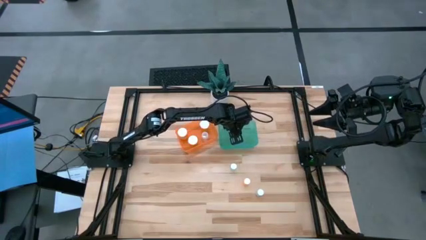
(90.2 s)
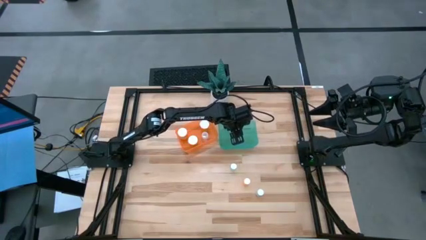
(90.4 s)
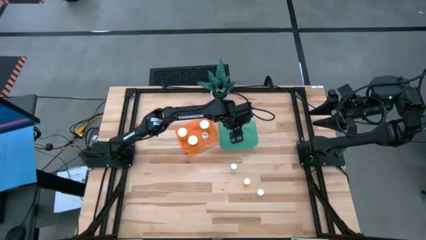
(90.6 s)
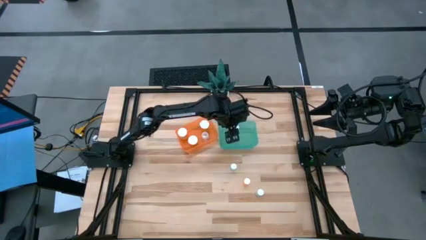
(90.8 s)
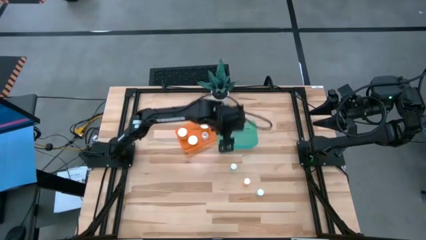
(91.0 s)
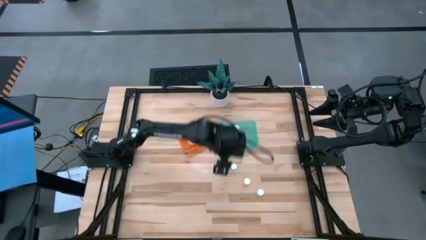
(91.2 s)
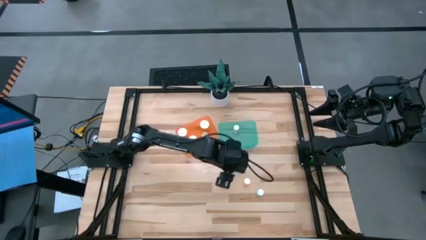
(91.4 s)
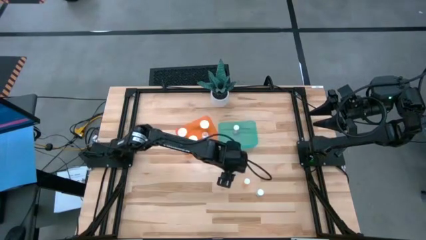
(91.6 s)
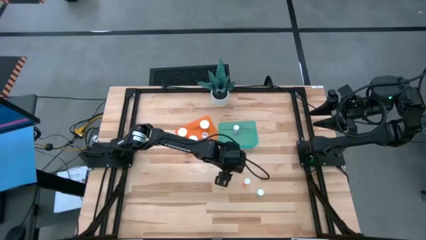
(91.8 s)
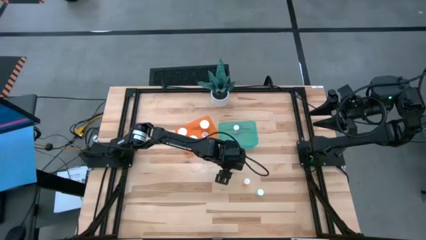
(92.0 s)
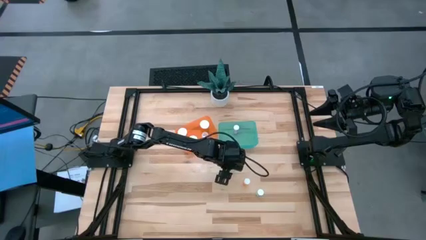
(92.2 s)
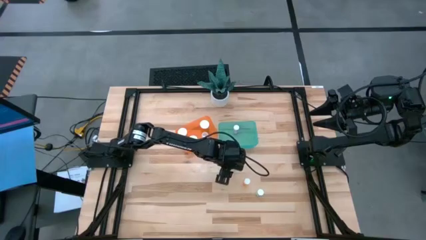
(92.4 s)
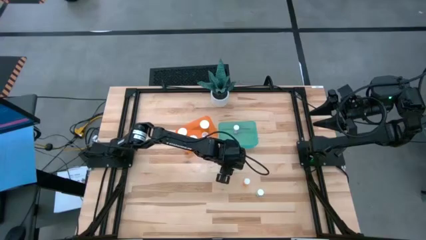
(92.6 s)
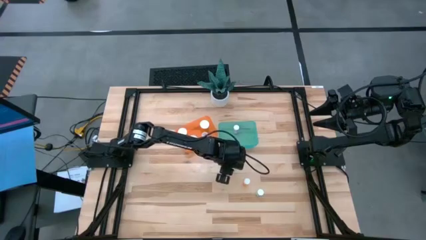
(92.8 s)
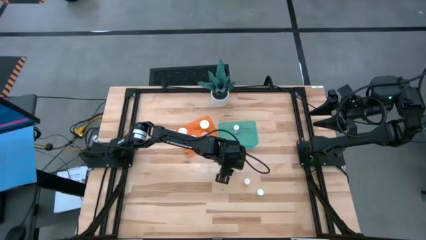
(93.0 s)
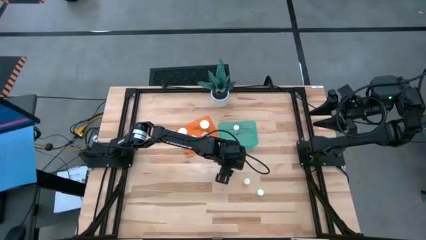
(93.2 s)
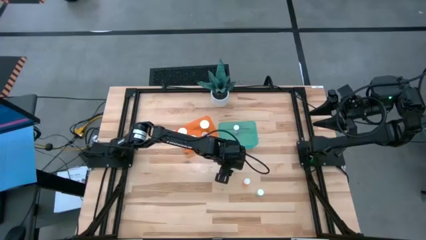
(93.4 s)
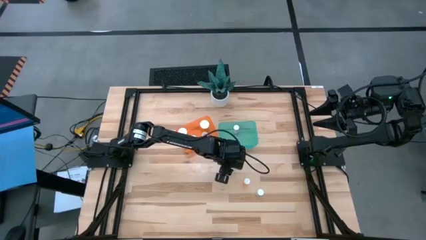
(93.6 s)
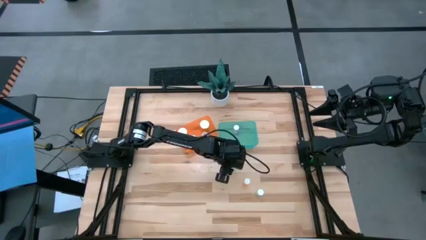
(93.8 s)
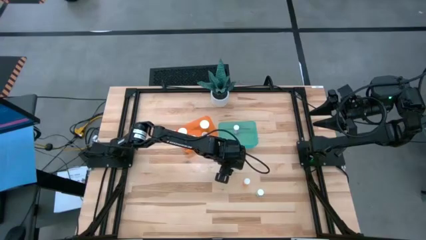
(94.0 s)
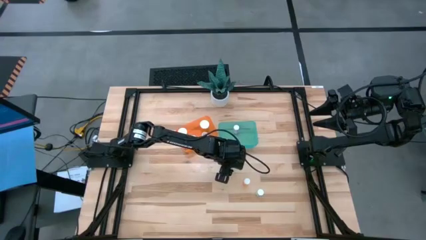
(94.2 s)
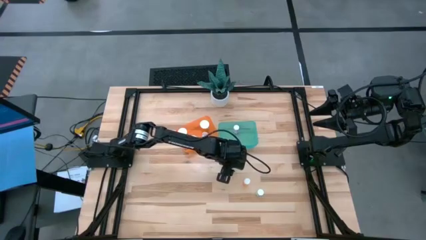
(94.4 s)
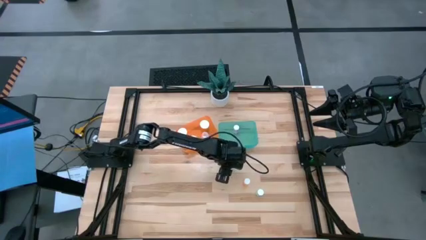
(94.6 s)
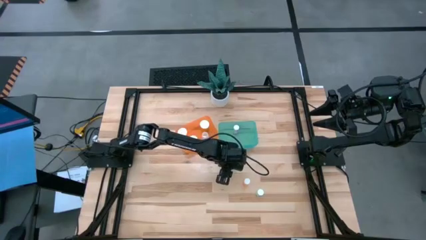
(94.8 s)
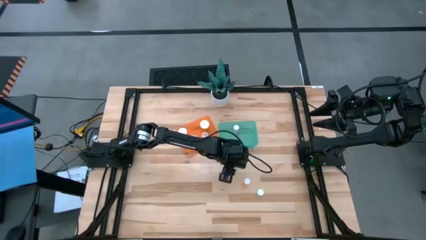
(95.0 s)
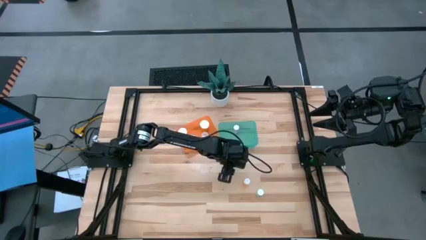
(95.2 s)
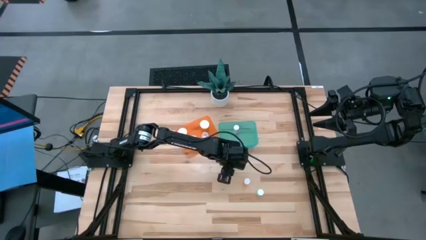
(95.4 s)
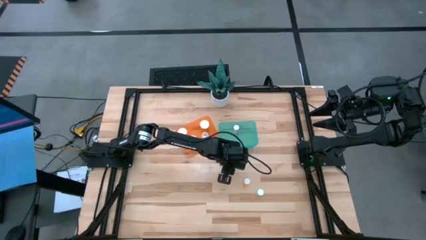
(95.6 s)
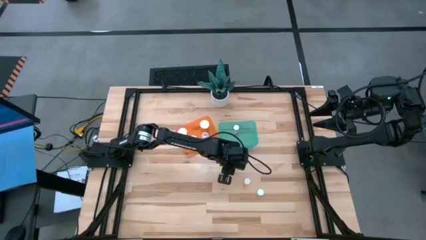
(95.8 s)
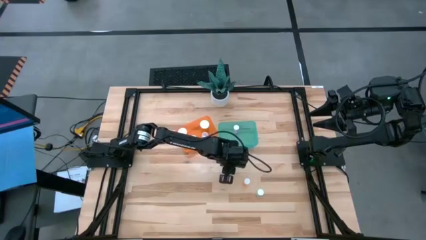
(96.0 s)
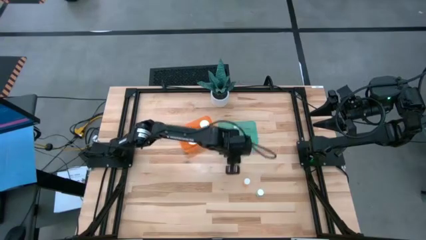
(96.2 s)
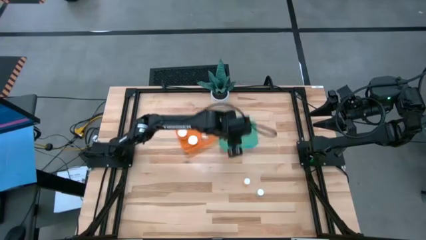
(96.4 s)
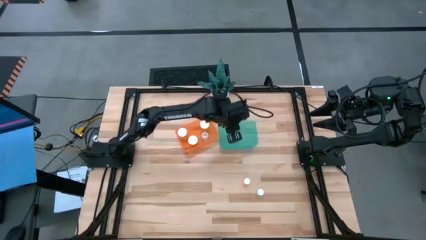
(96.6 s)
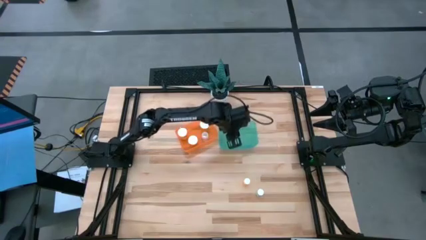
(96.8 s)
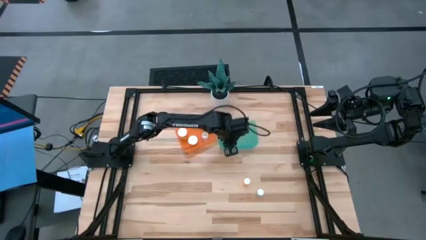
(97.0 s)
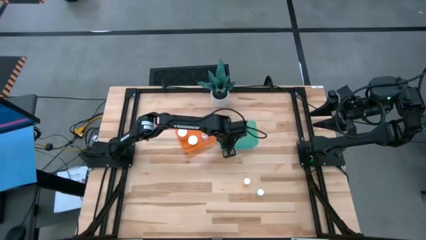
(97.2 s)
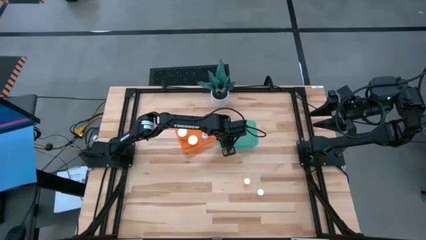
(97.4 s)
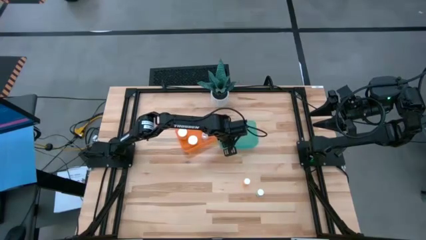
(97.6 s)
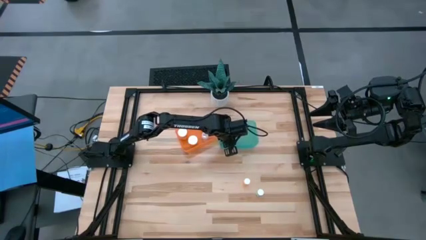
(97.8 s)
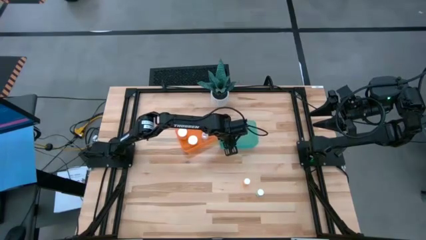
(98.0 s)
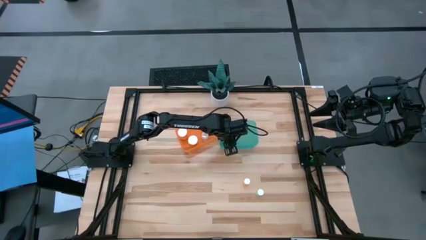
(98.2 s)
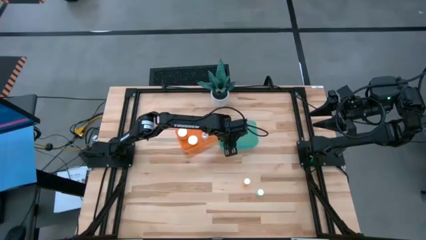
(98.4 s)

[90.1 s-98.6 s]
Task: Pick and place medicine bottles into bin by pill shape (circle, oval)
Put the left blue tablet bottle into the blue bin

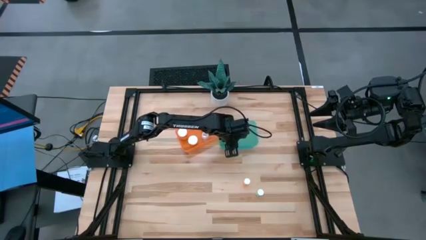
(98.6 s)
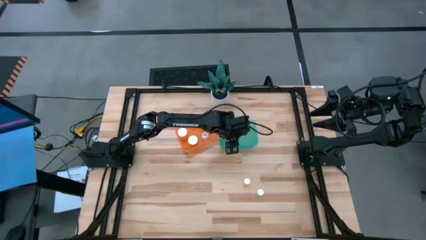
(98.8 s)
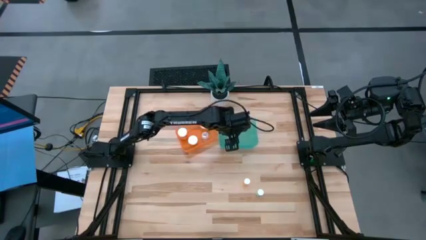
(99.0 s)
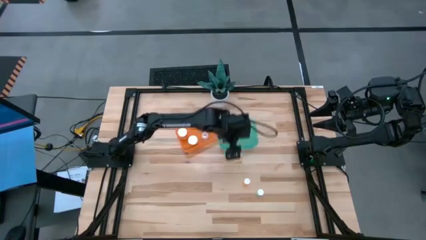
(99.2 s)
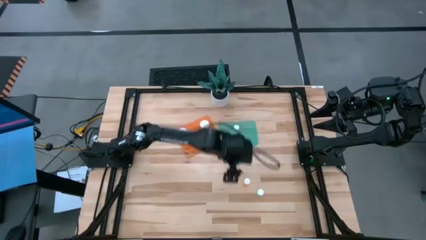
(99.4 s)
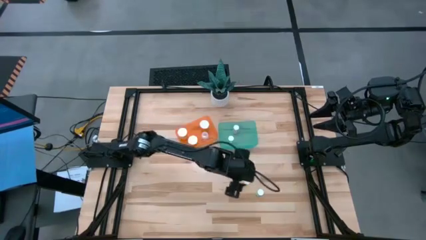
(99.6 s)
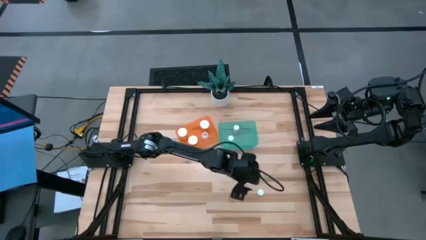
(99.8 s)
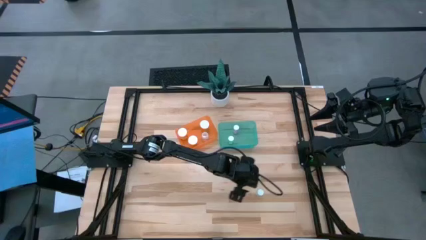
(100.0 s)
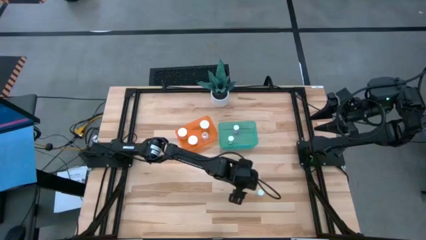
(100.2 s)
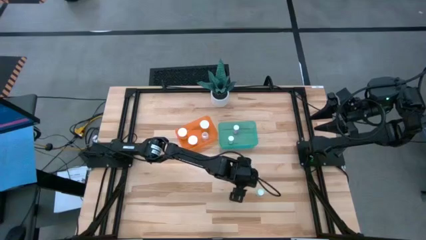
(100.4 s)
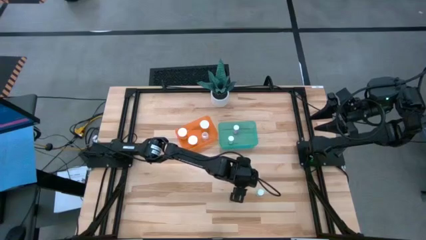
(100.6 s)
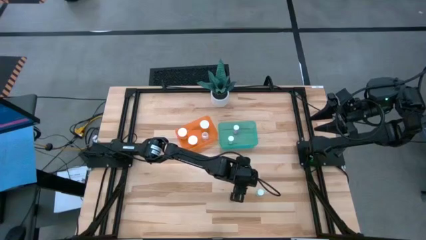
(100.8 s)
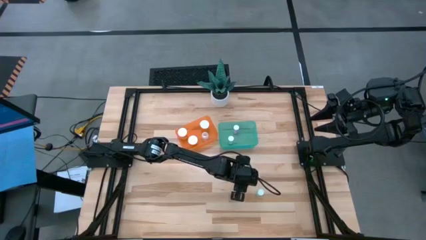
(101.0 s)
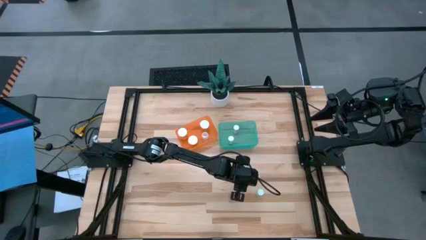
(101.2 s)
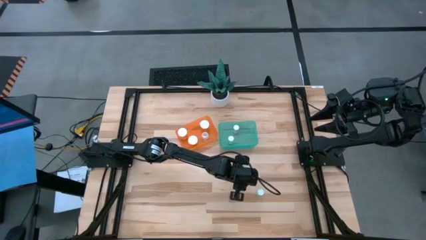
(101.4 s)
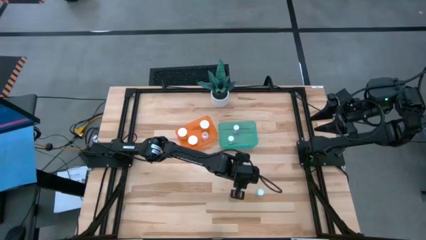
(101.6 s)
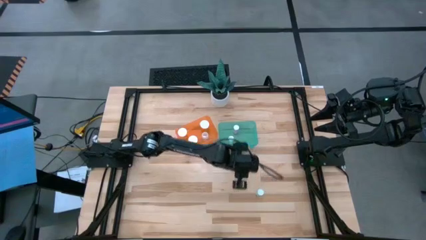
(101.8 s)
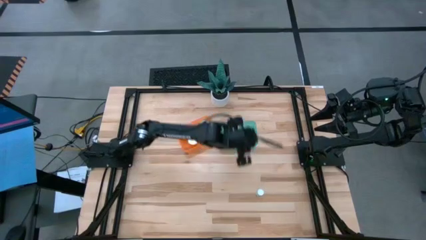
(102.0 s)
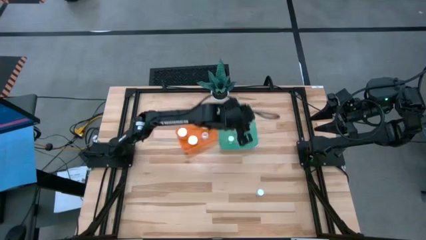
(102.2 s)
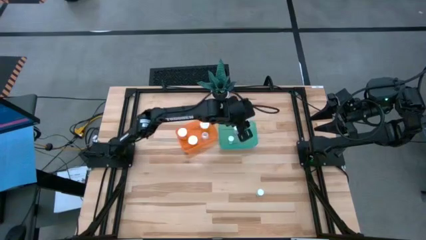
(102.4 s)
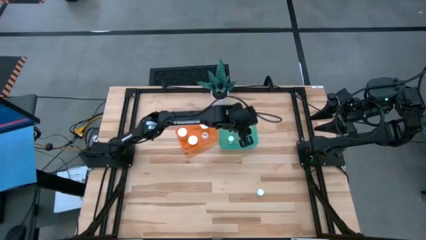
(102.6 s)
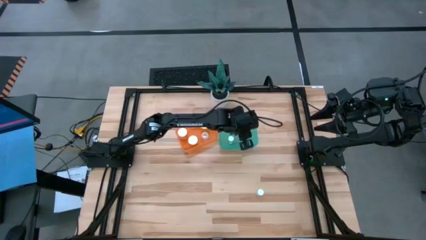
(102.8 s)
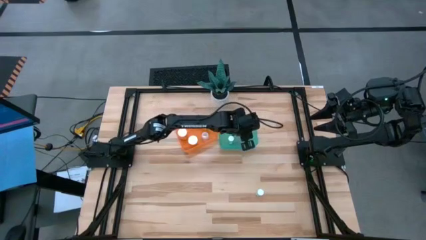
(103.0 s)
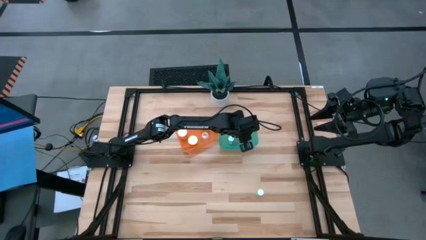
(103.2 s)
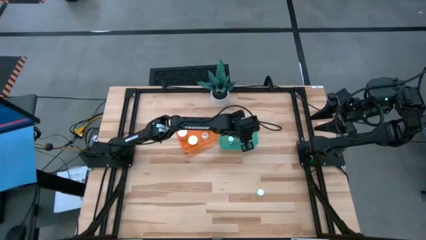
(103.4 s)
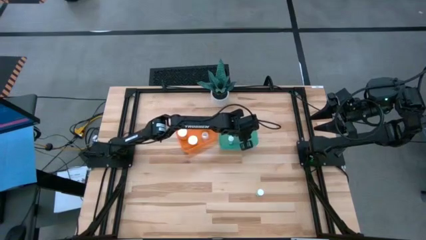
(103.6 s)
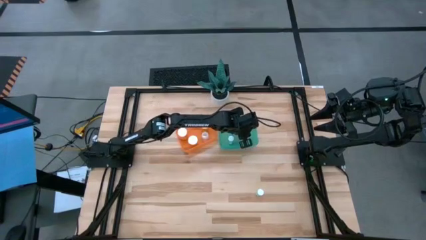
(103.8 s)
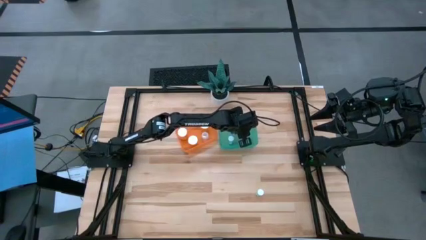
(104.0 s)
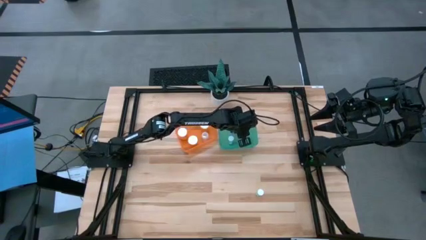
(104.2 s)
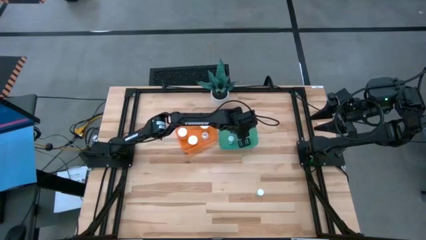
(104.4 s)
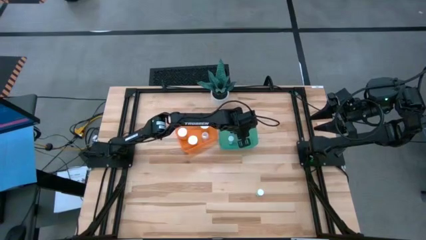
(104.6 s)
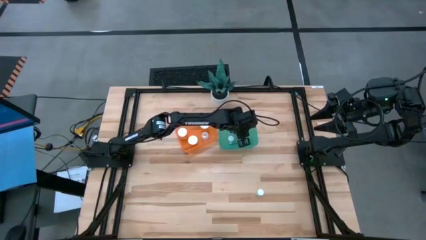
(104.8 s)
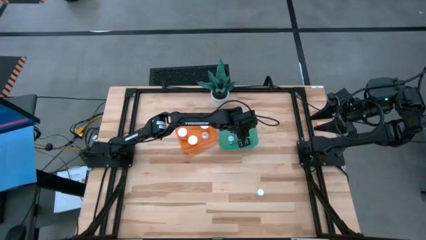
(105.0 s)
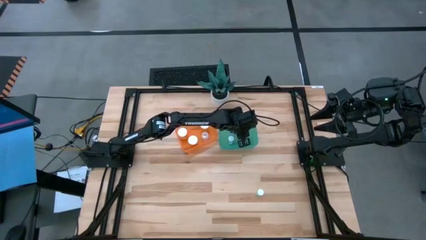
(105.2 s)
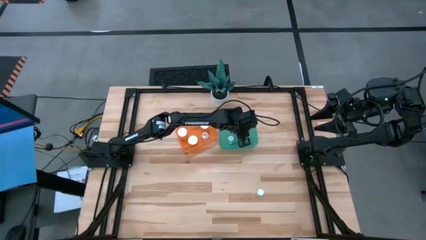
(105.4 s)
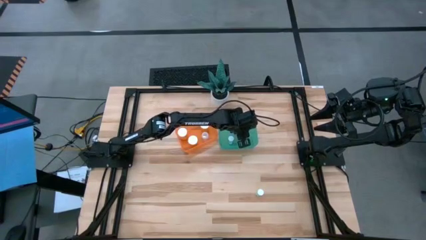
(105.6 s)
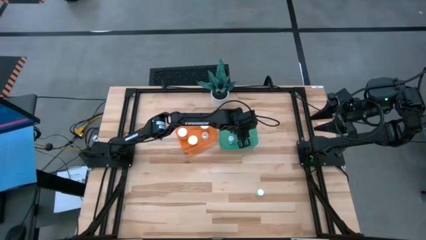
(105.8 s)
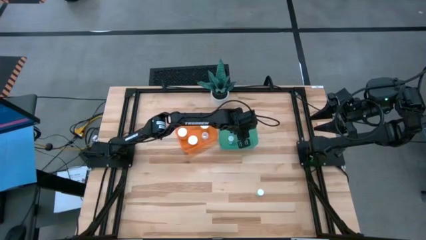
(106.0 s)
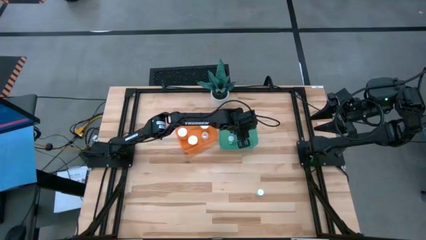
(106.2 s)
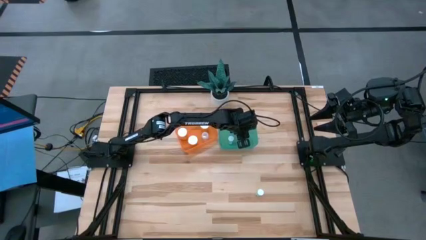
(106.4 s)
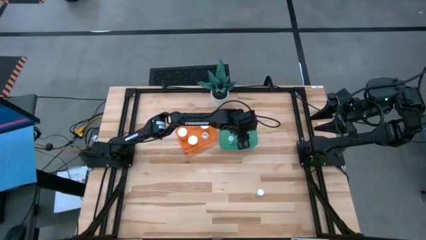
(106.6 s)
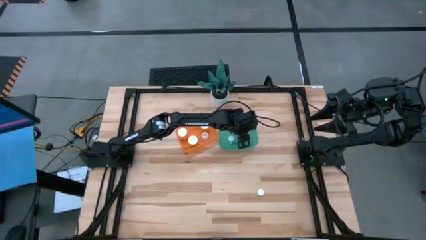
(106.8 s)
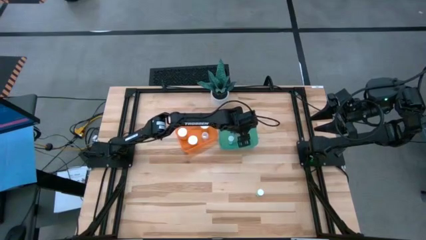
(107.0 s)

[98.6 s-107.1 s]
Put the orange tablet bottle into the blue bin
